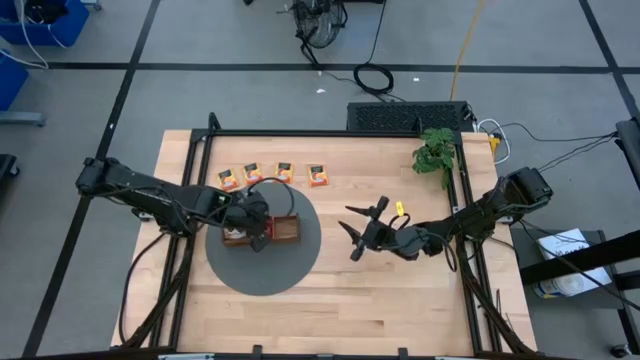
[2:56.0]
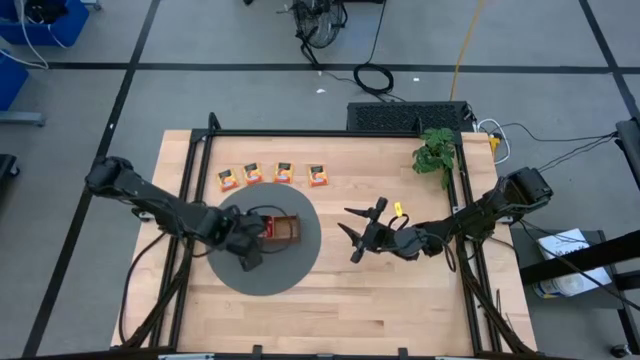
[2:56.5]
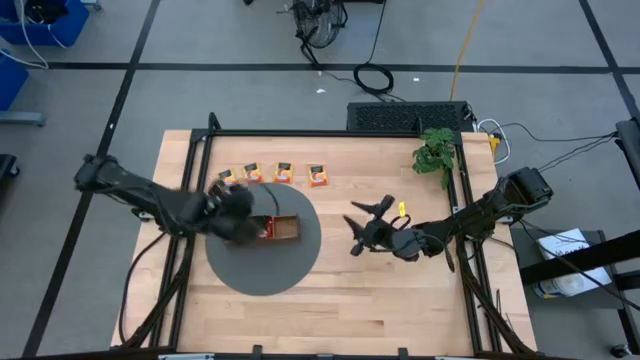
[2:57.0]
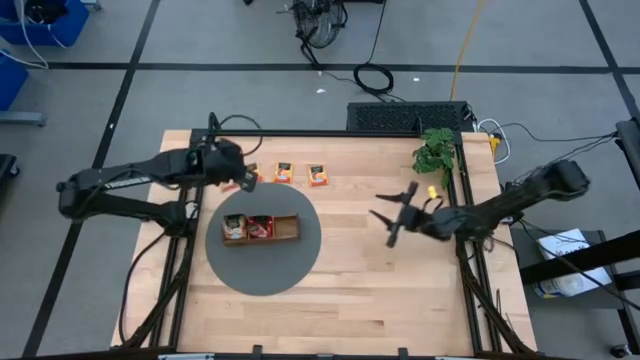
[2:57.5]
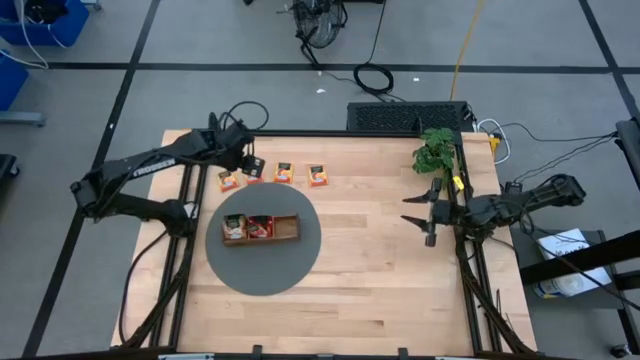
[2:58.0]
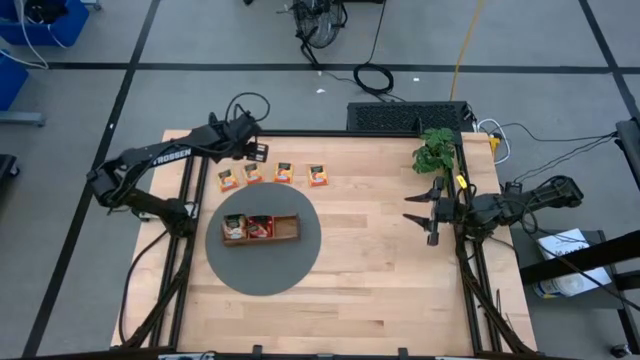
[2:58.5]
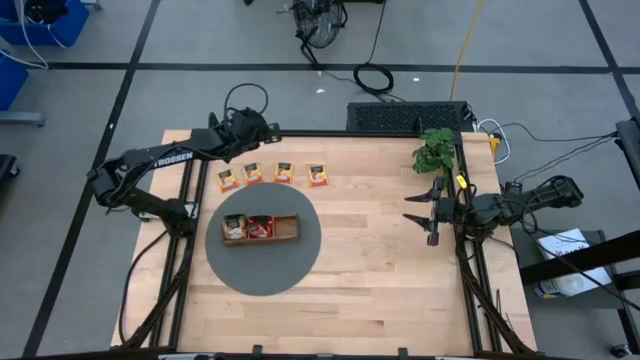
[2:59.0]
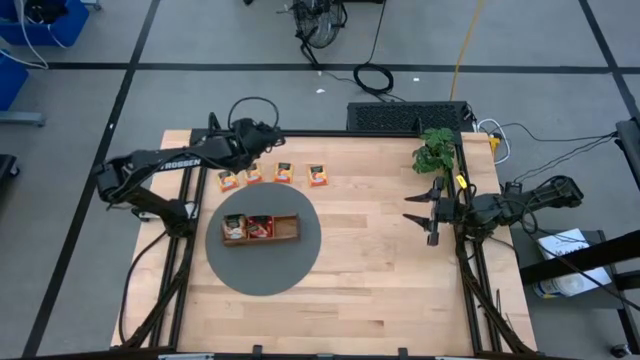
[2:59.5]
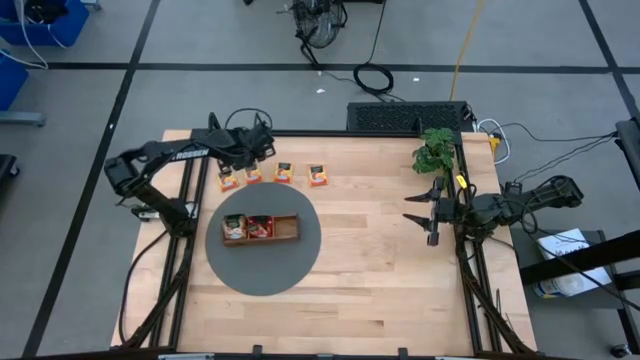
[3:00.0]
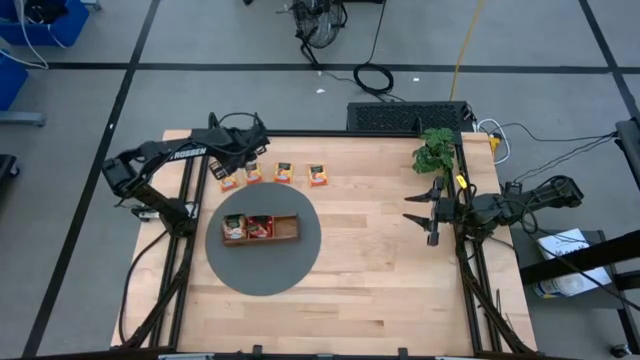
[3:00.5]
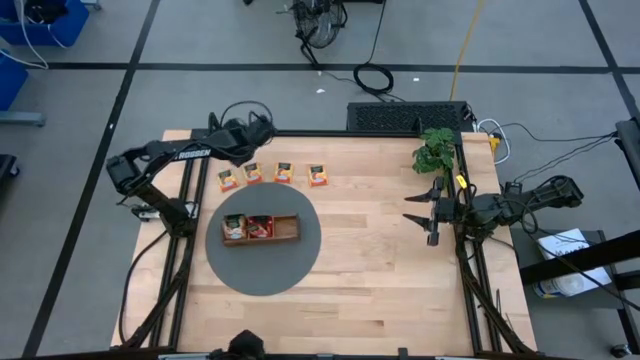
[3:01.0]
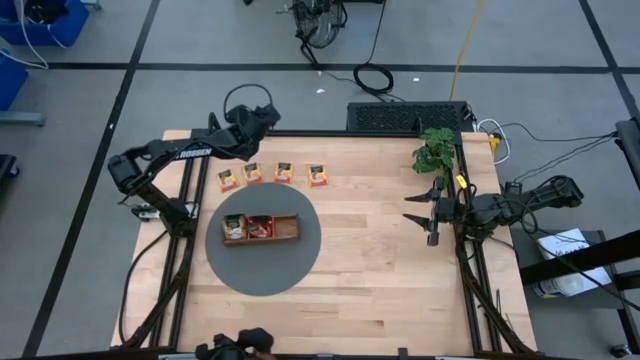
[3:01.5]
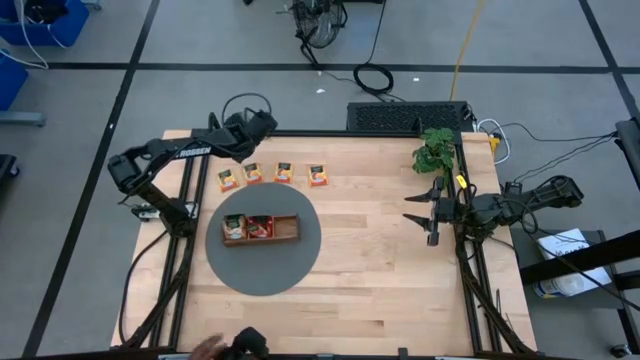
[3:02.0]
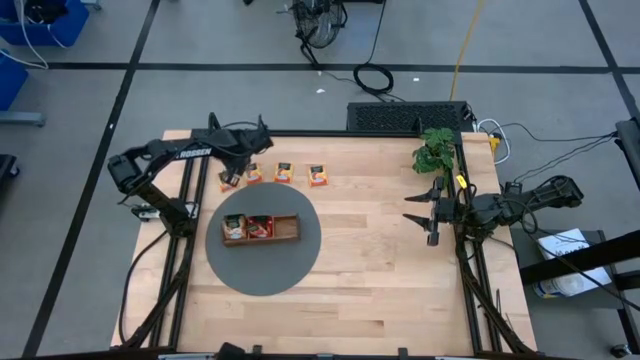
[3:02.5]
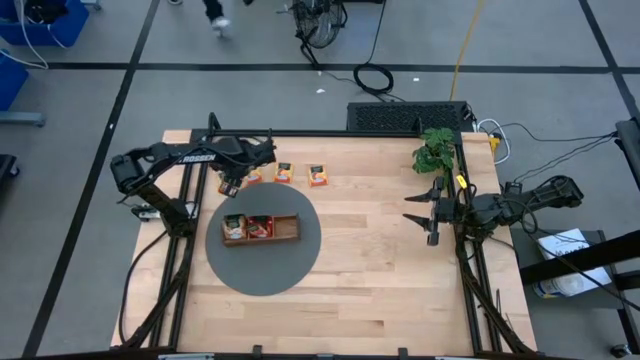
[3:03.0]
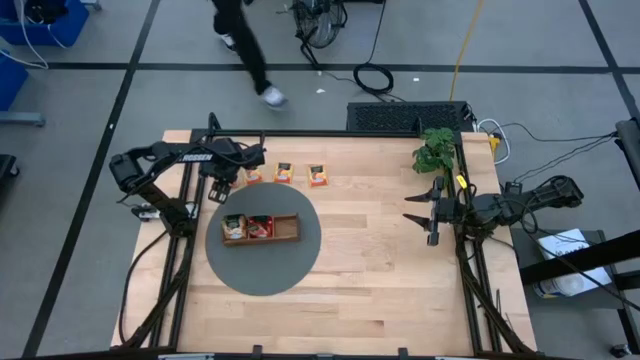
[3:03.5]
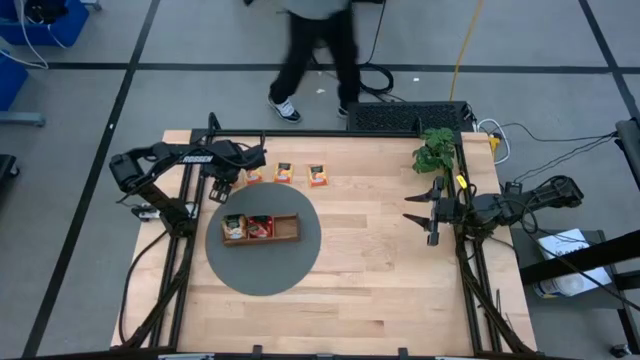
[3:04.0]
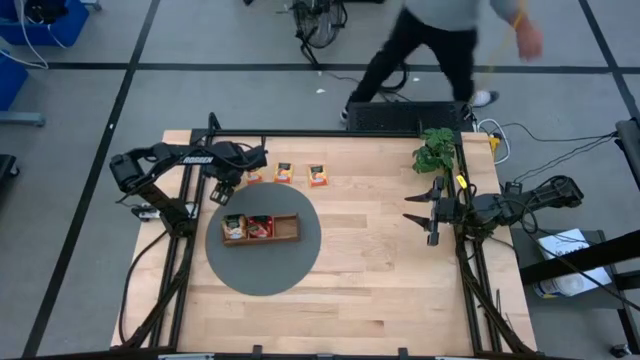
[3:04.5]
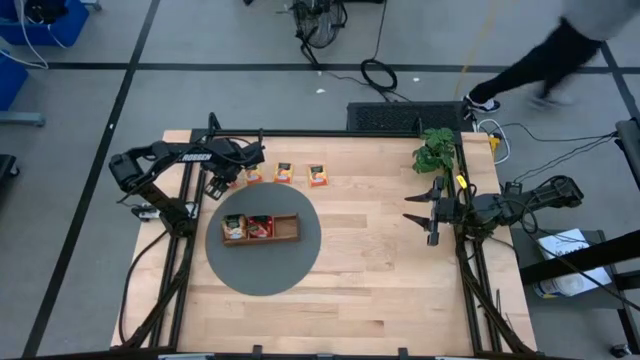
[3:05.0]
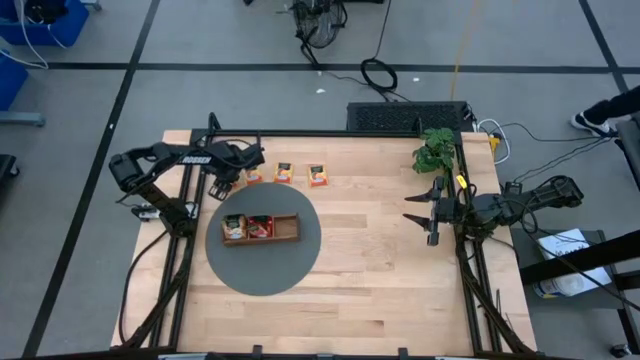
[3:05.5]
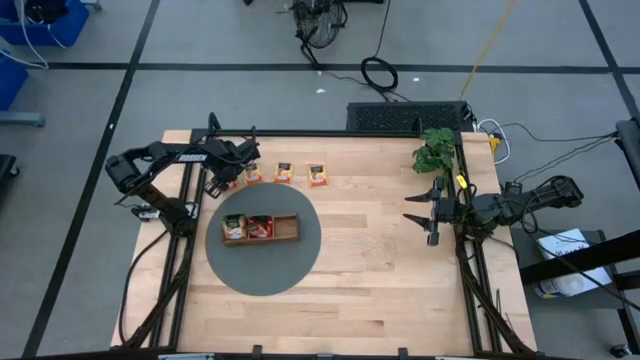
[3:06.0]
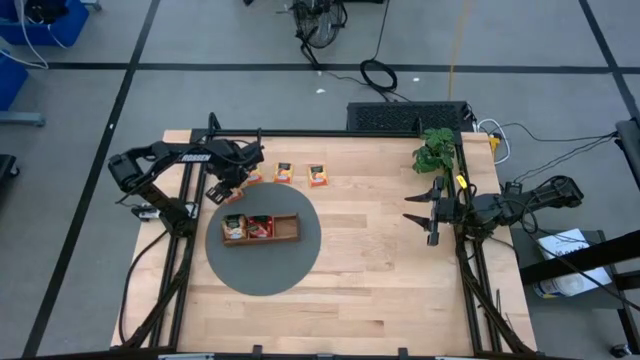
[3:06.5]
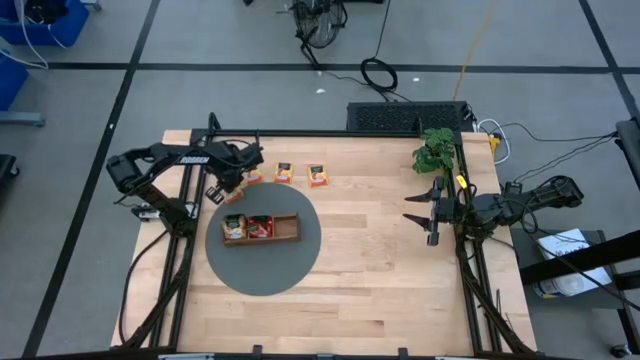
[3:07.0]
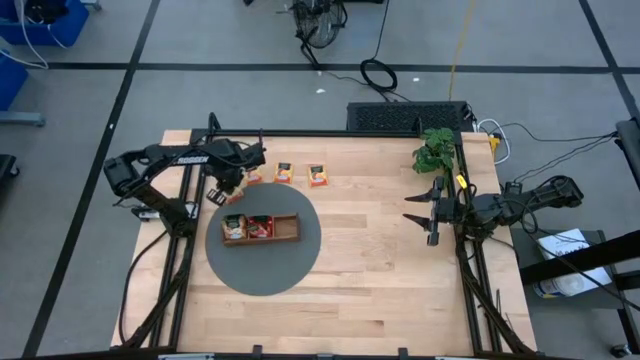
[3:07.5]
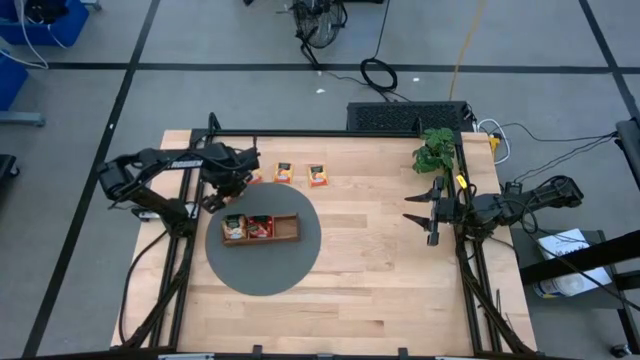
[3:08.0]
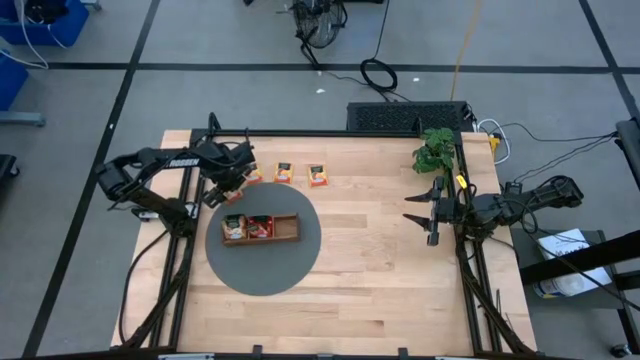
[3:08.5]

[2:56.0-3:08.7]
Task: Pick & Place Tea
Put the yellow tea bag into the right section of the wooden organizer

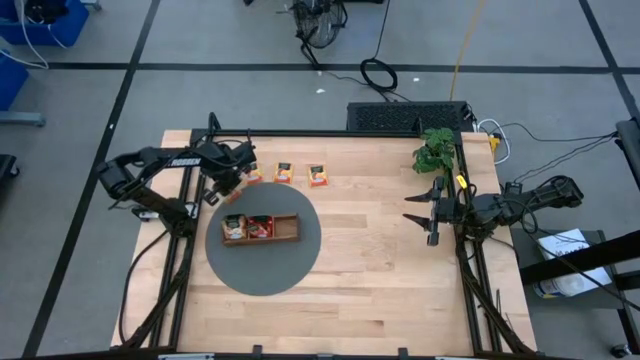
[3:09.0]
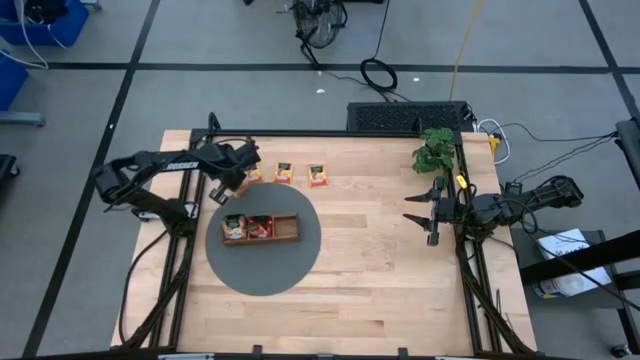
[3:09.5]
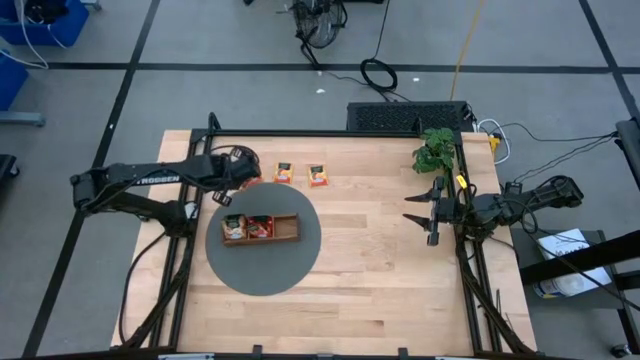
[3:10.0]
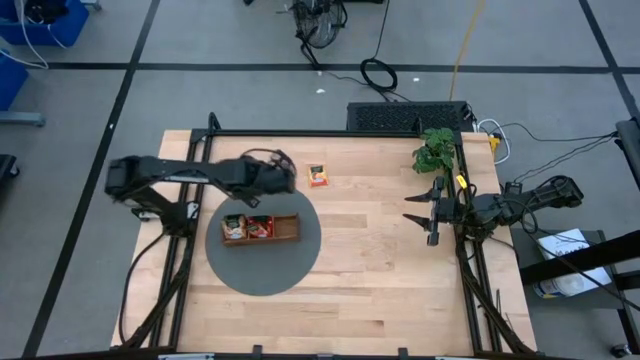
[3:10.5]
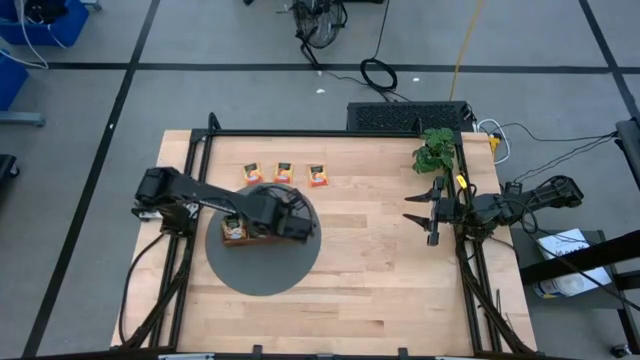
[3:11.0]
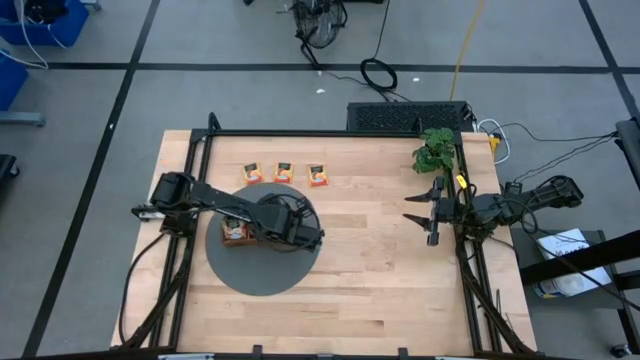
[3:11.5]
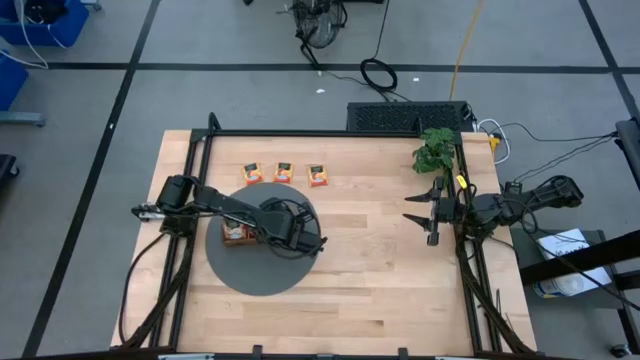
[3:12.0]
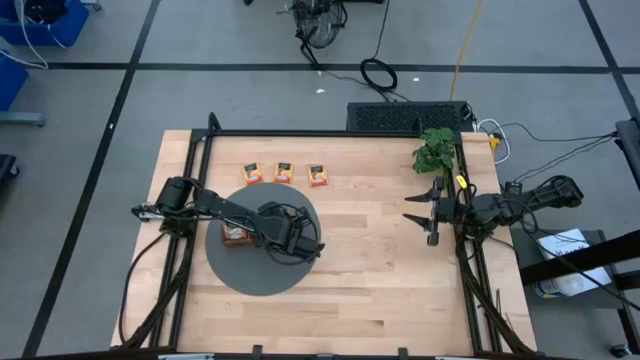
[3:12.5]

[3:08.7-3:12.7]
Put the yellow tea bag into the right section of the wooden organizer

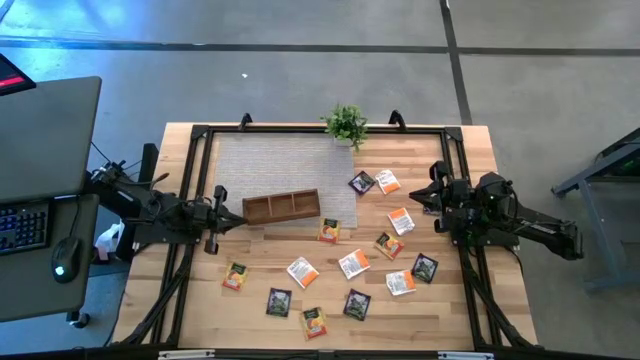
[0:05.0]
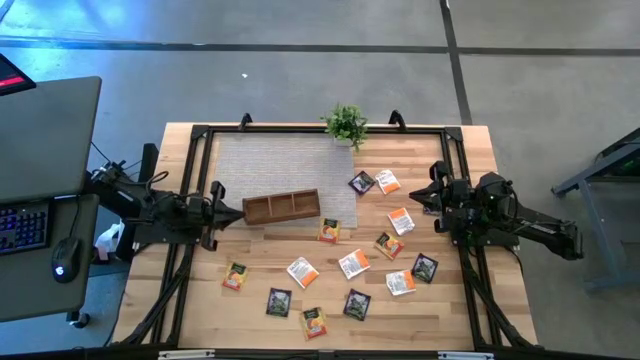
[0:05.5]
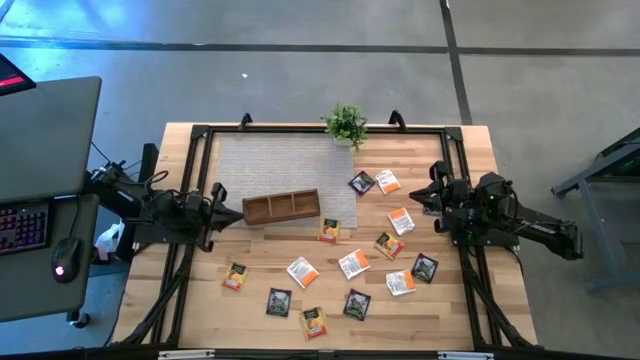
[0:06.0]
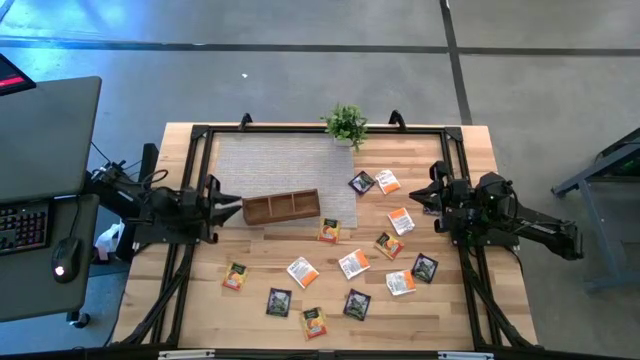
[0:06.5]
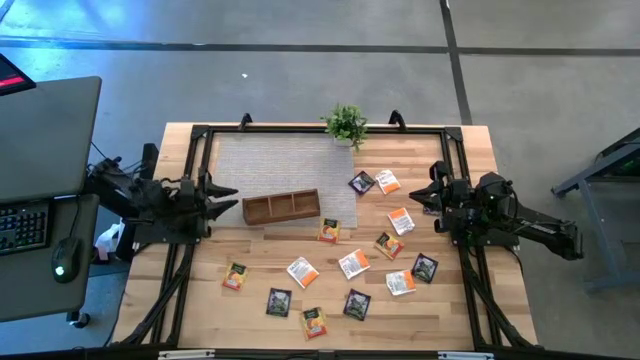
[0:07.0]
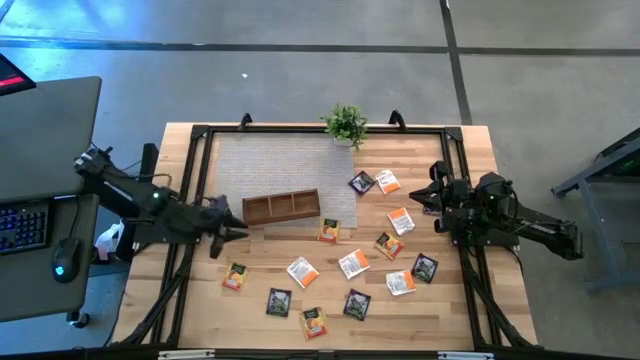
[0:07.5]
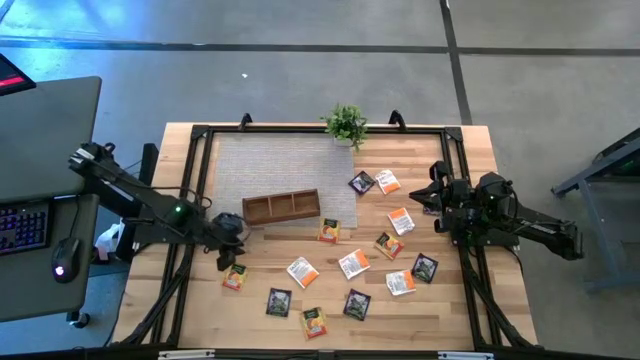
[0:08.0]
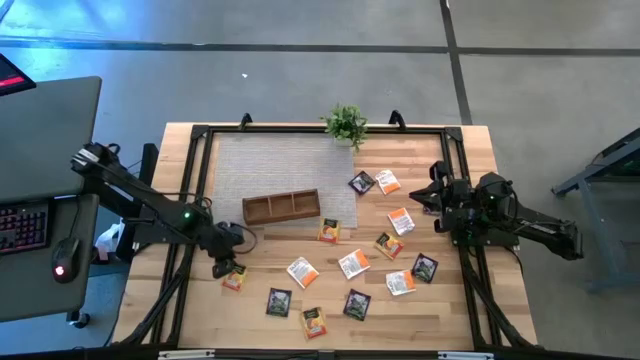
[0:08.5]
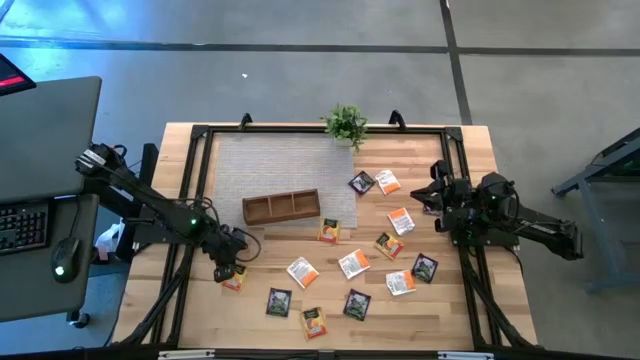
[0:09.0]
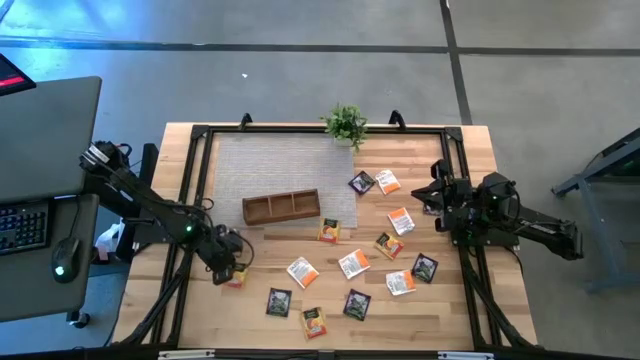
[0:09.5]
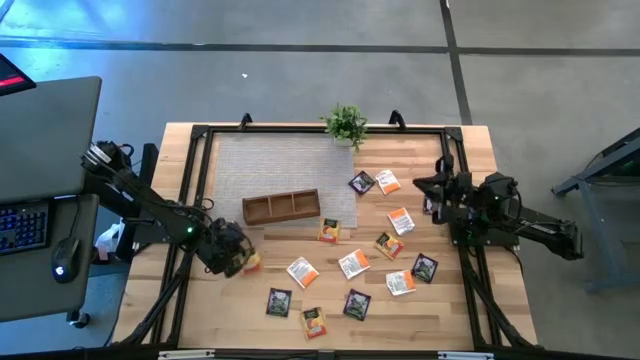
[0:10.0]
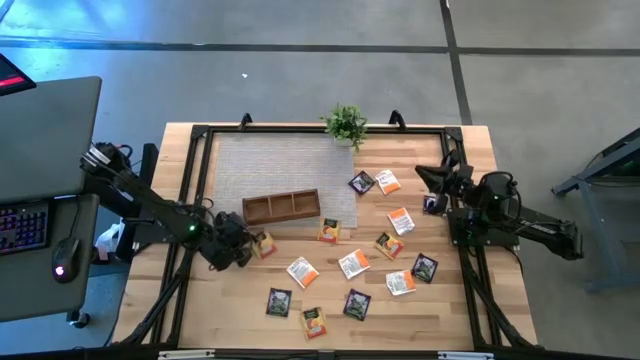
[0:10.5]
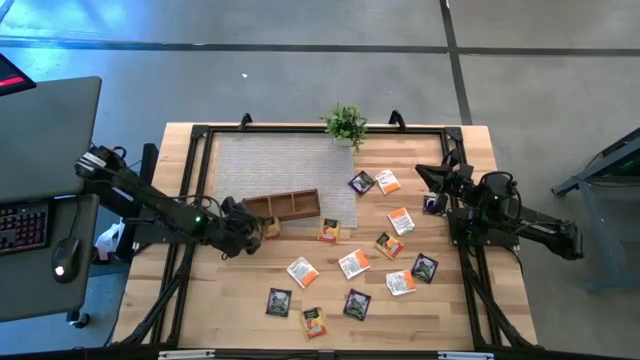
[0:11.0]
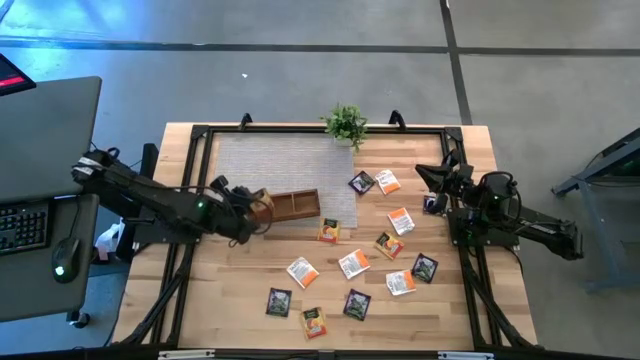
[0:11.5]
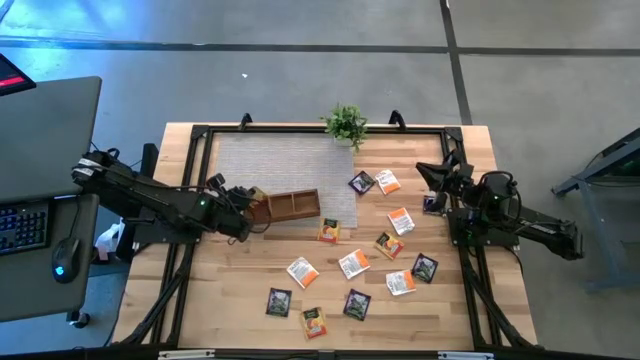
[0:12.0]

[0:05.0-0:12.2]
Task: Pick & Place Tea
Put the yellow tea bag into the left section of the wooden organizer
